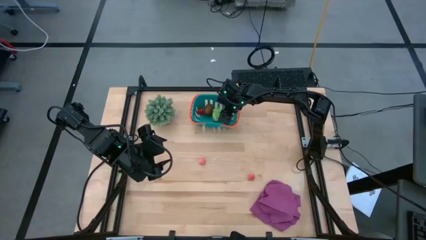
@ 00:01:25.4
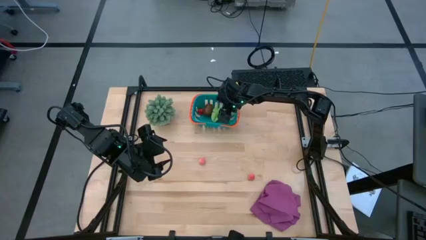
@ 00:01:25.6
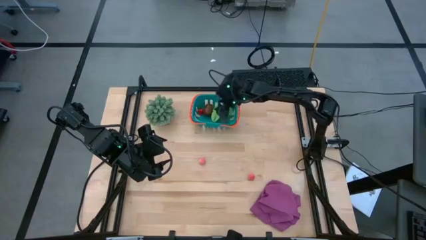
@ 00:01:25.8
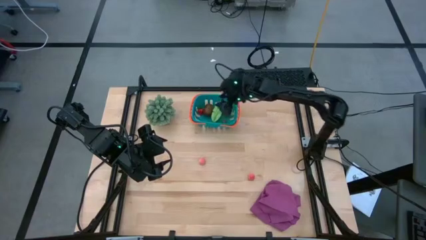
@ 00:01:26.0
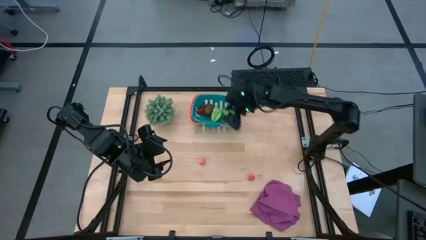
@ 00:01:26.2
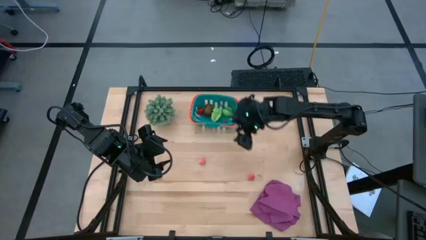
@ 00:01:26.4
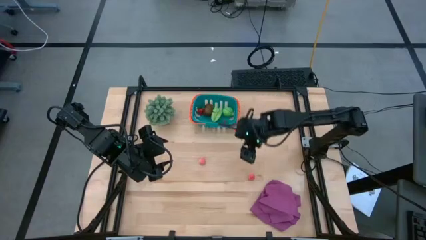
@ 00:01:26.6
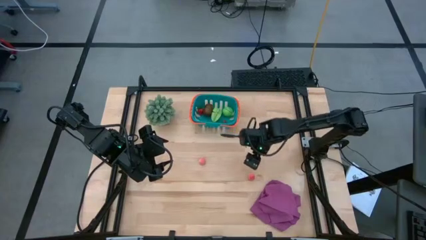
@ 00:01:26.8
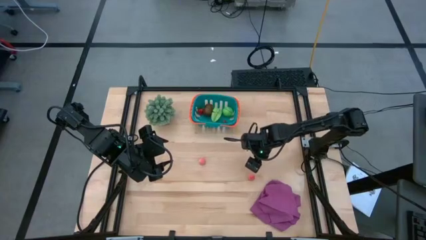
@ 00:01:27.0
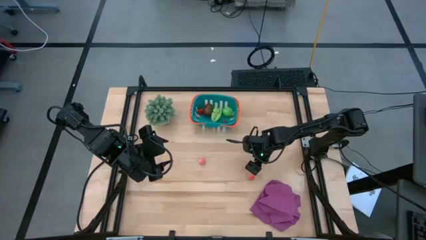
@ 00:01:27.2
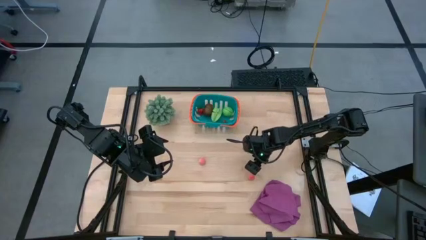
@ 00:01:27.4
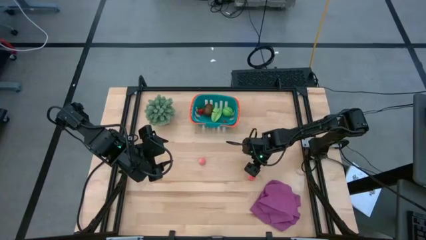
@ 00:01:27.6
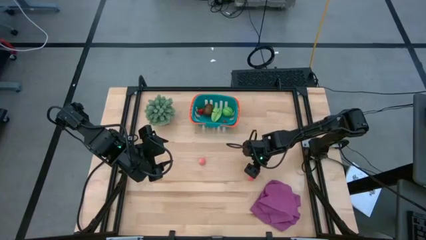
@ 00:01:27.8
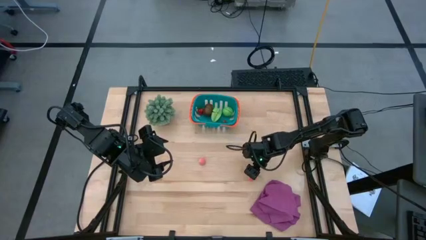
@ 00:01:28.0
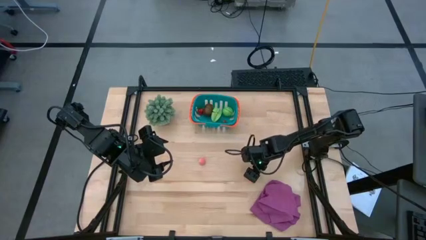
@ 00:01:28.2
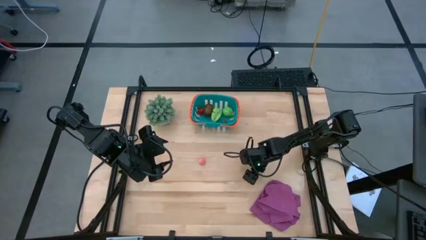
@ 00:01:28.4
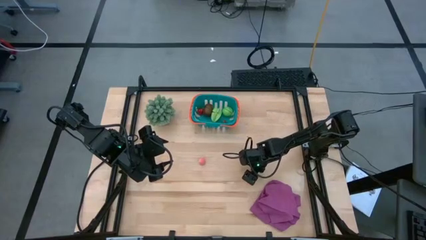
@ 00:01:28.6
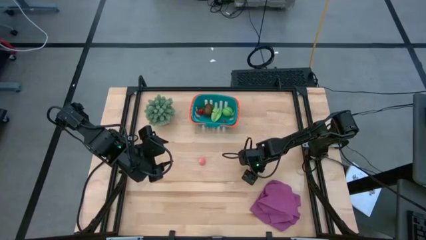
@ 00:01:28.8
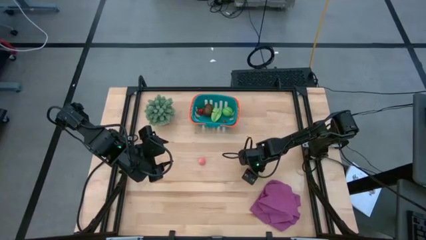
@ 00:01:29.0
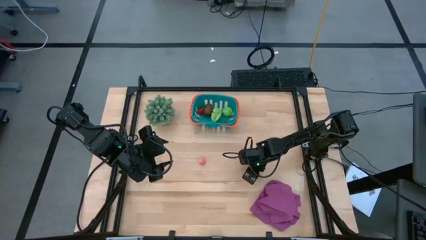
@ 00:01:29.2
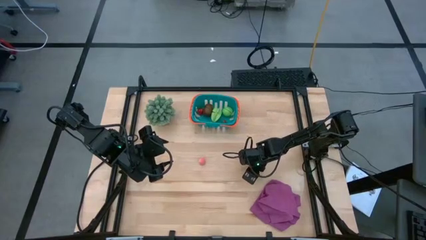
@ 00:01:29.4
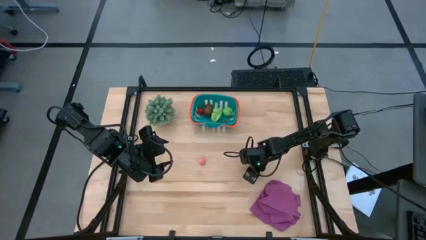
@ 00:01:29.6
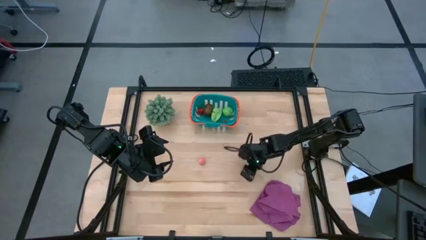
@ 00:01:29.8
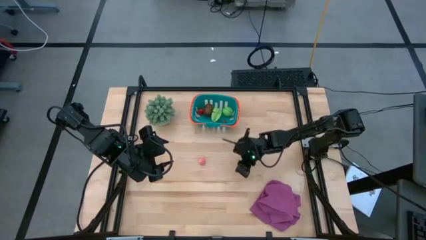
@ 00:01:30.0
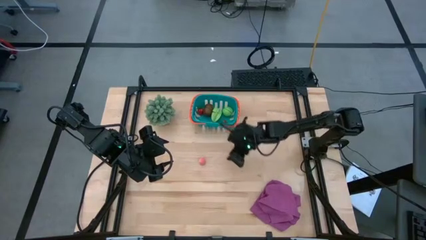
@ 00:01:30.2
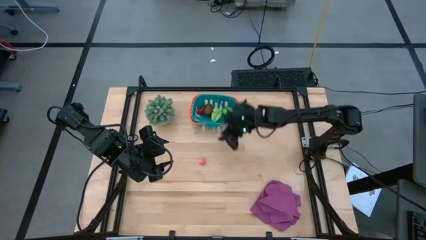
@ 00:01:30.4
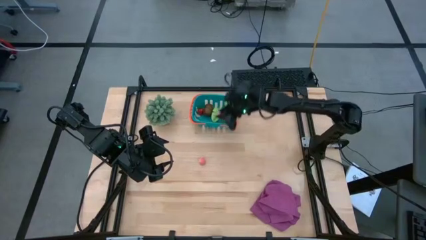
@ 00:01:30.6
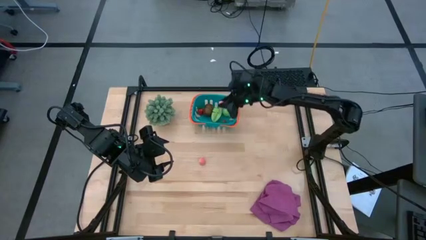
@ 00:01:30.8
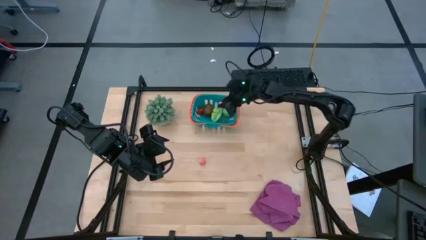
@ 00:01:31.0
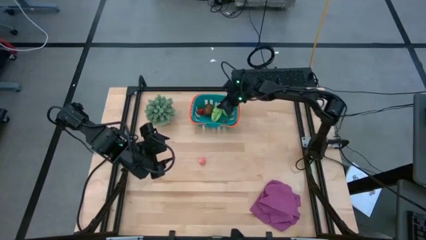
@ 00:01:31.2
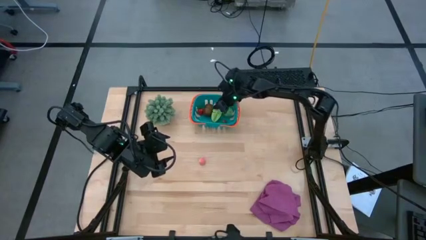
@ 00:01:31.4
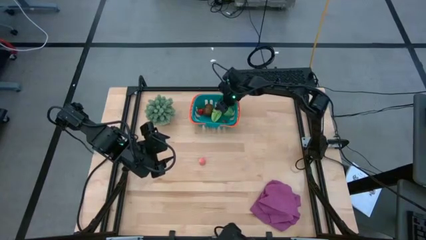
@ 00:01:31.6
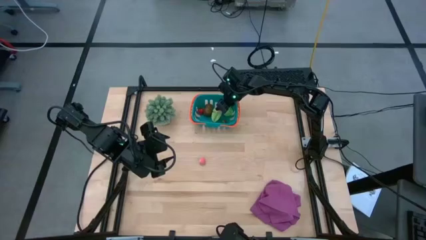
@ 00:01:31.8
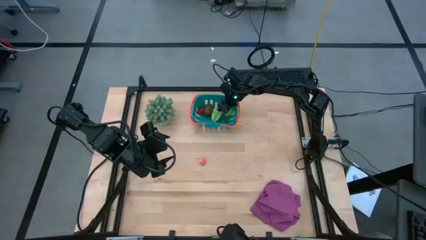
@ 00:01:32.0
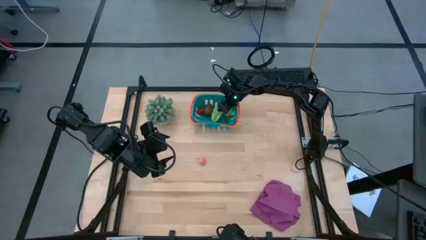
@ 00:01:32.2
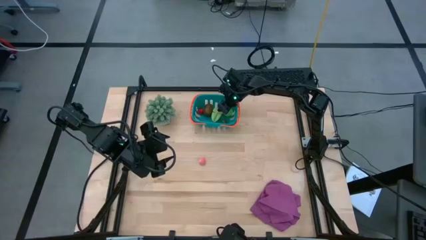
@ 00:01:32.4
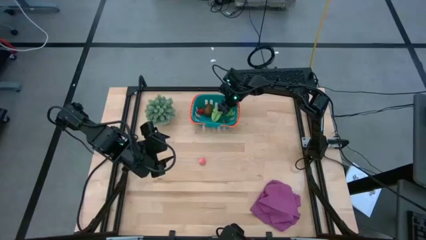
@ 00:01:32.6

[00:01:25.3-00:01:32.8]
Task: Pick and placing Produce into tupperware
Put the right pink peach into the blue basket

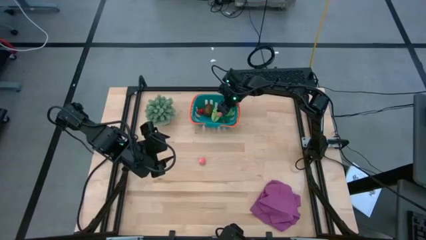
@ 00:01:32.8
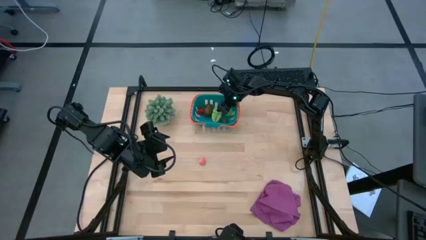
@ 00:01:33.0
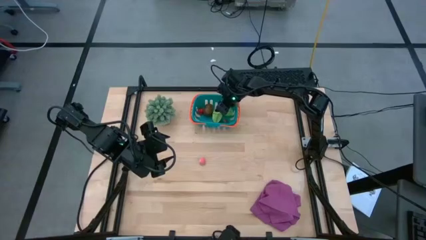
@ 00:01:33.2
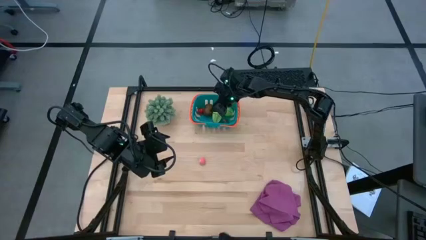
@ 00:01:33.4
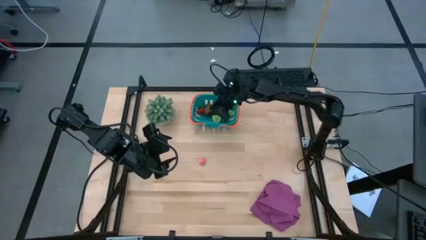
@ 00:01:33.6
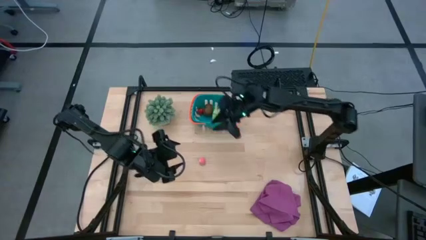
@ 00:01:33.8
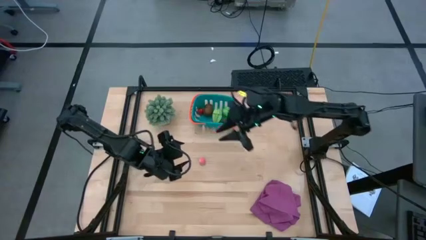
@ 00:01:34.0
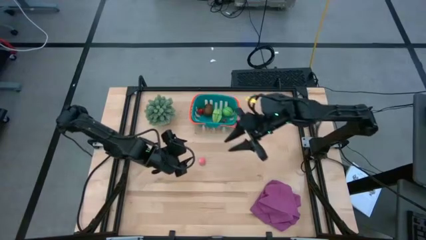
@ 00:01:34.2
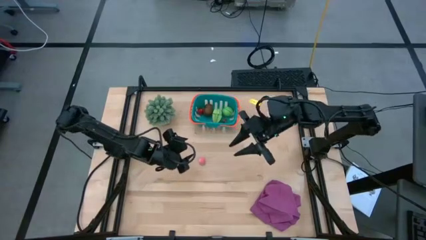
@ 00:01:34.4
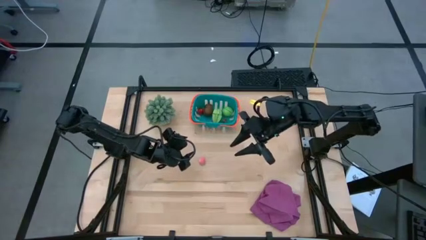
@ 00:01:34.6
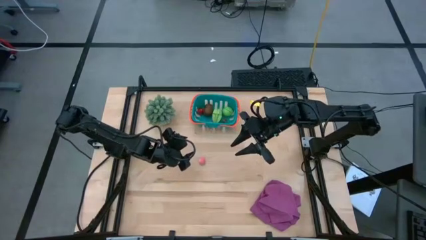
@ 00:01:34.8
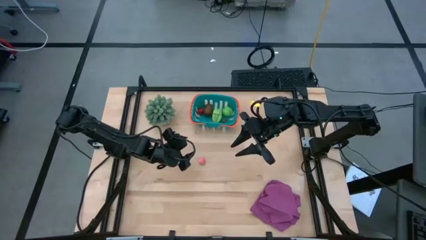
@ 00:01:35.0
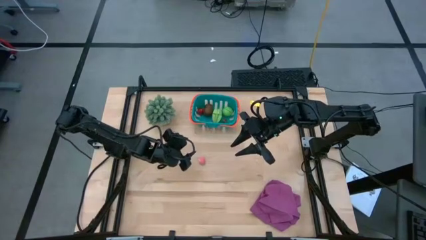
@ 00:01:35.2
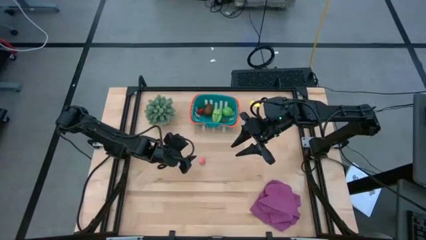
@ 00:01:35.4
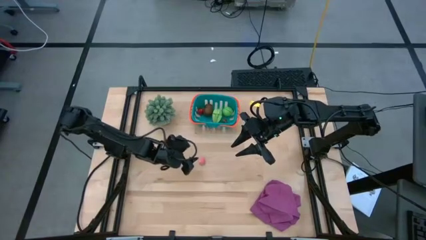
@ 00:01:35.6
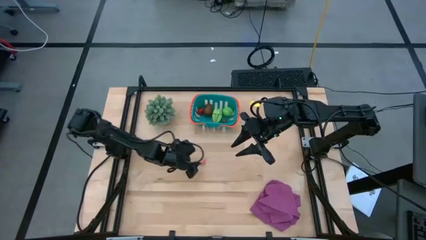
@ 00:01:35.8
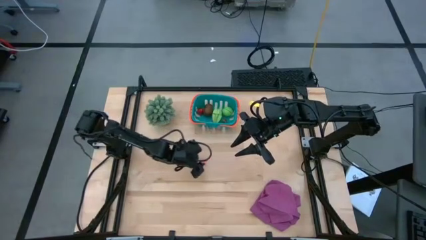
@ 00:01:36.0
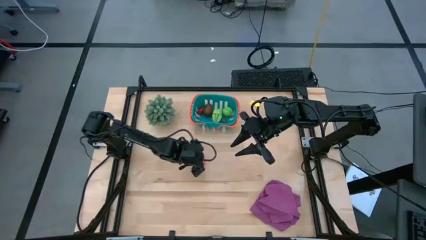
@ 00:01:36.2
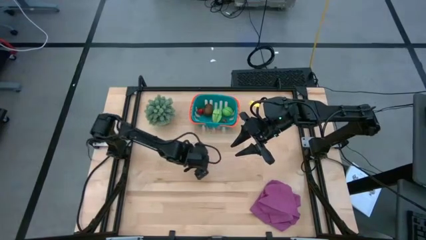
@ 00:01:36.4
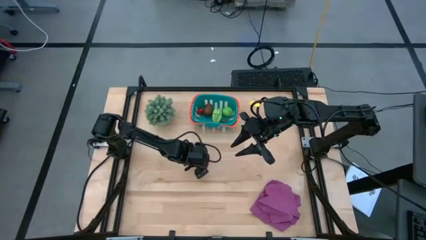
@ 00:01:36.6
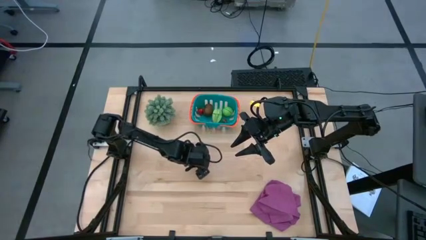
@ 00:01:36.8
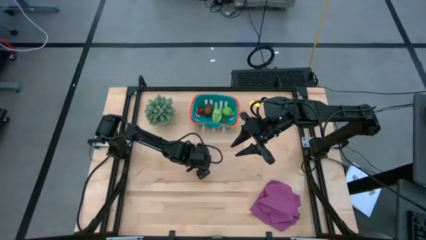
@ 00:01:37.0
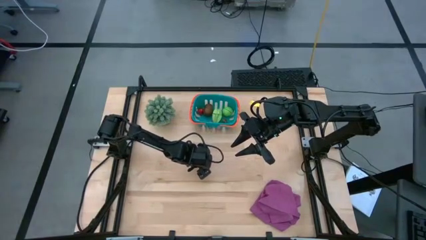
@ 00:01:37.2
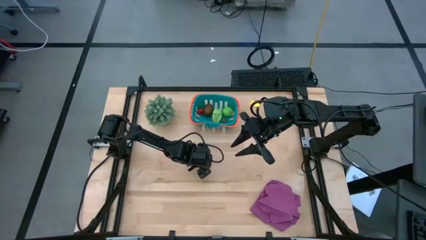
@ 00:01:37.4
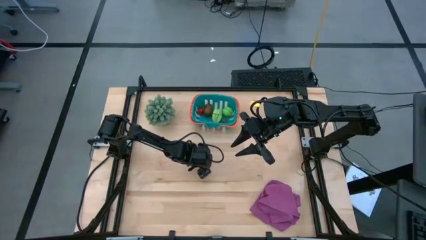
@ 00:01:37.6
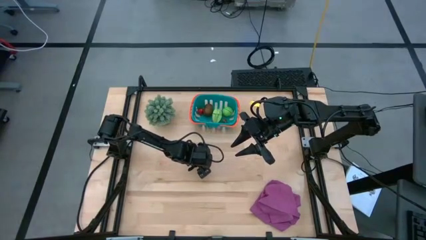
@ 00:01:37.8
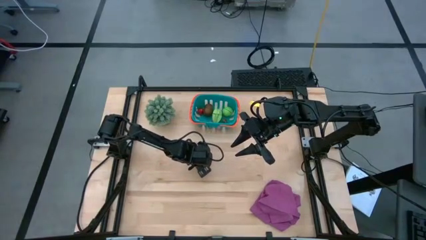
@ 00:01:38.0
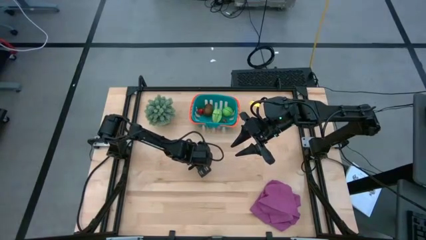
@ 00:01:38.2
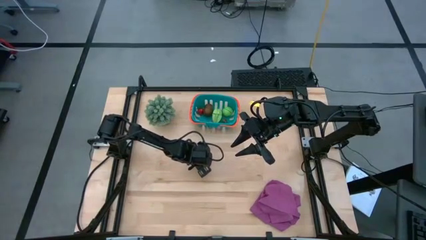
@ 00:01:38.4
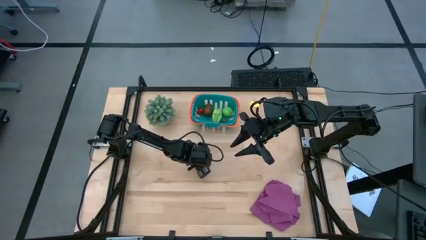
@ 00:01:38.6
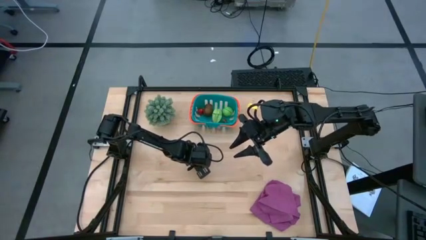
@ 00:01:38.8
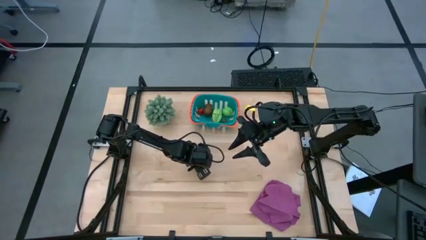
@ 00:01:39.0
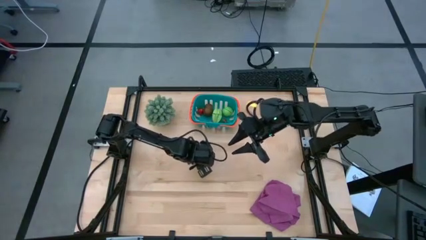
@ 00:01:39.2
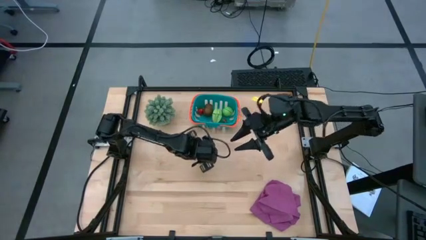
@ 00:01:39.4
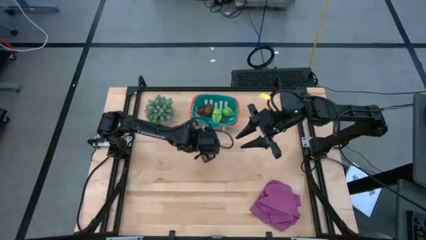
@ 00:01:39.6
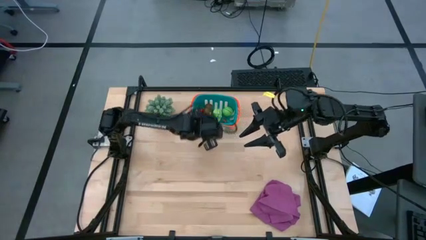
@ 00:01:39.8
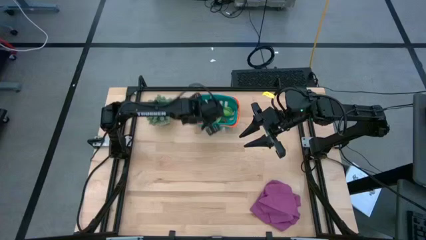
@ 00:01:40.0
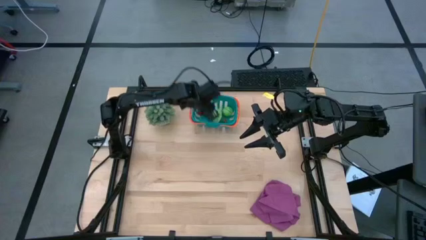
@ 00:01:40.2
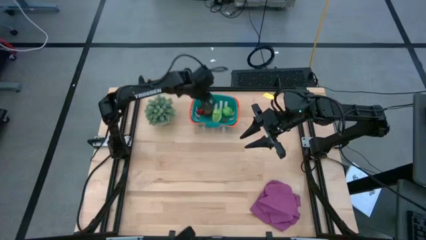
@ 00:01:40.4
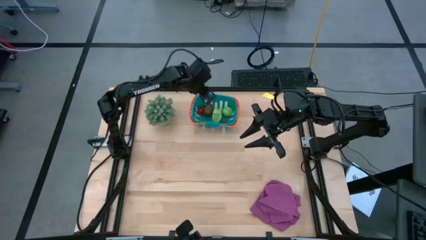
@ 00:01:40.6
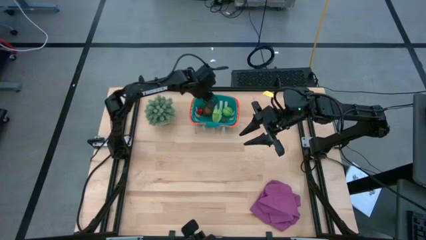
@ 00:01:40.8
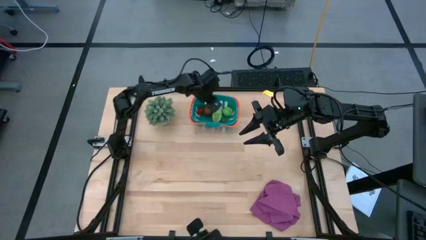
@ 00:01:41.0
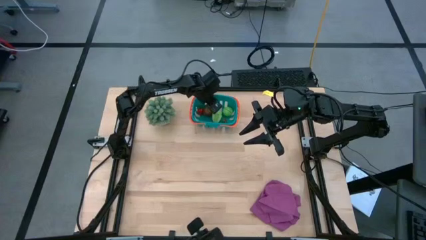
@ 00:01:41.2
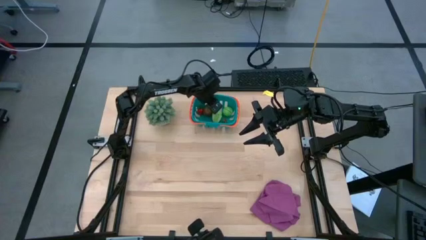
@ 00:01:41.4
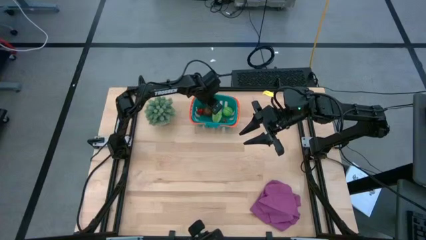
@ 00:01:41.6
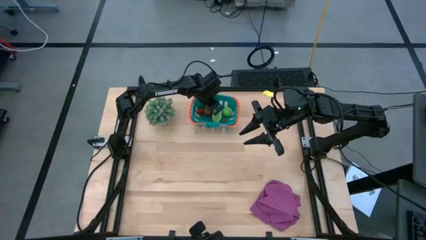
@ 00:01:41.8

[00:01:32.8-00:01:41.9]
Put the pink peach into the blue basket
